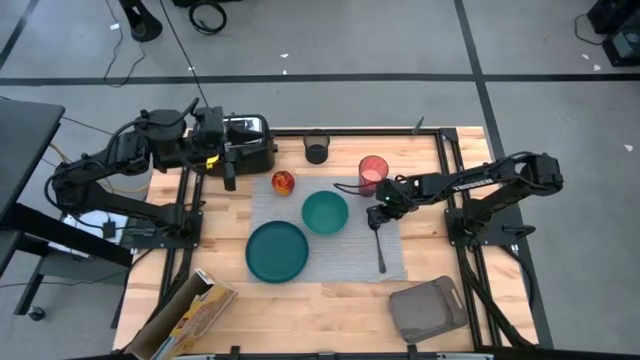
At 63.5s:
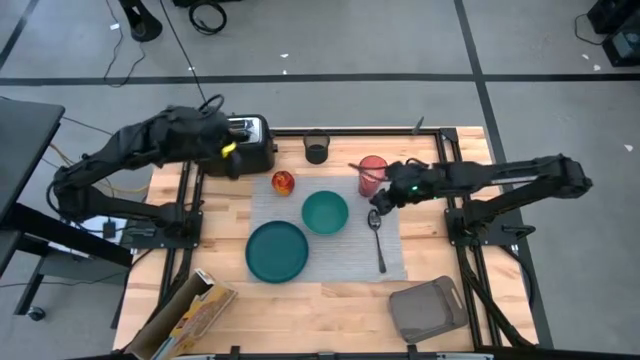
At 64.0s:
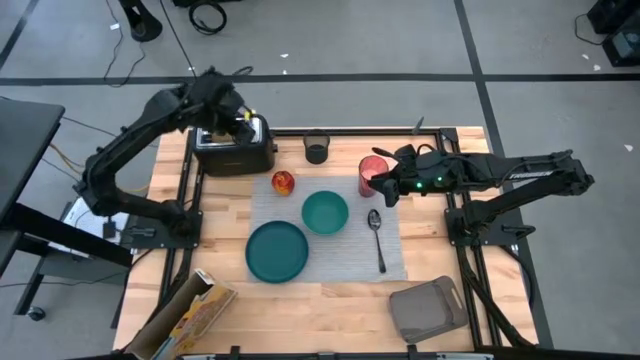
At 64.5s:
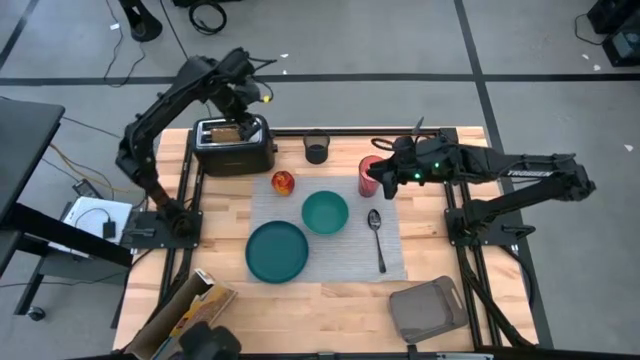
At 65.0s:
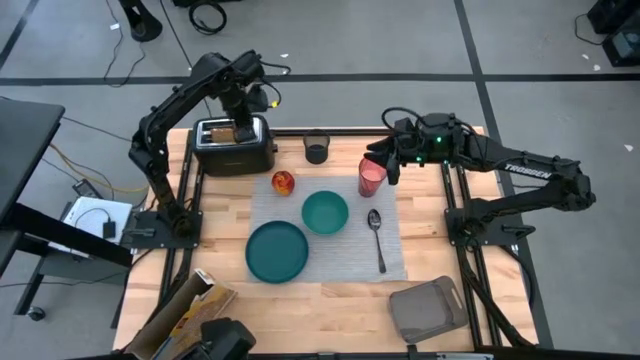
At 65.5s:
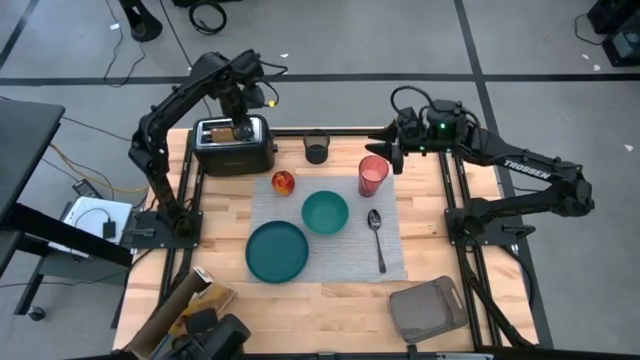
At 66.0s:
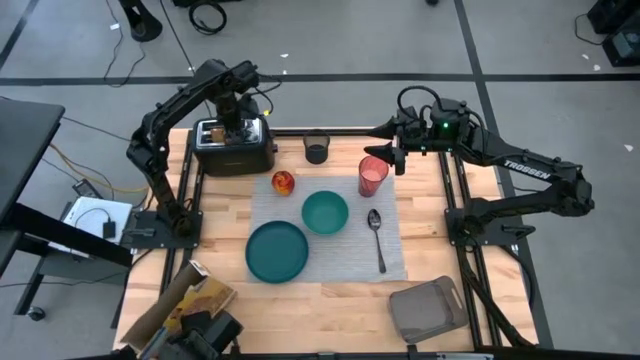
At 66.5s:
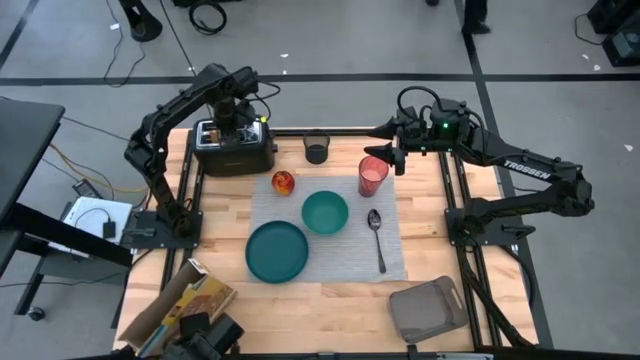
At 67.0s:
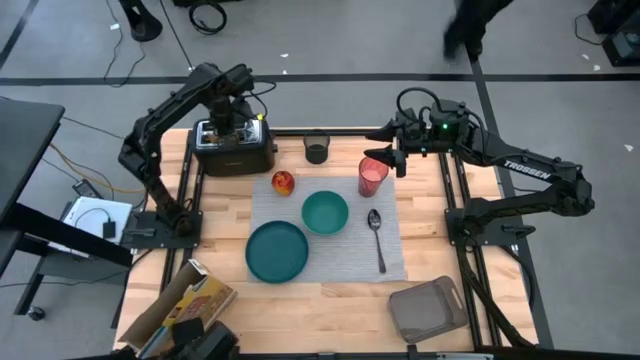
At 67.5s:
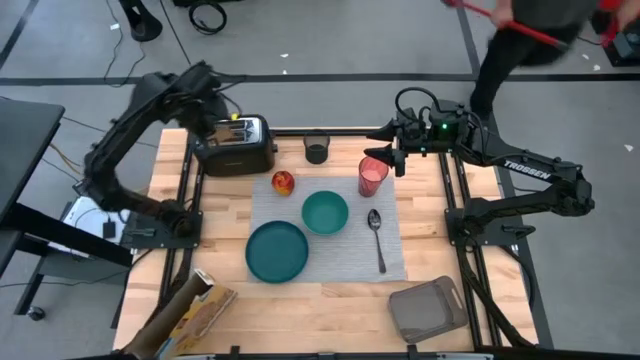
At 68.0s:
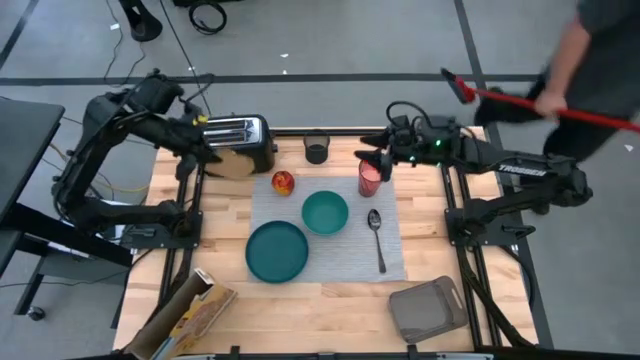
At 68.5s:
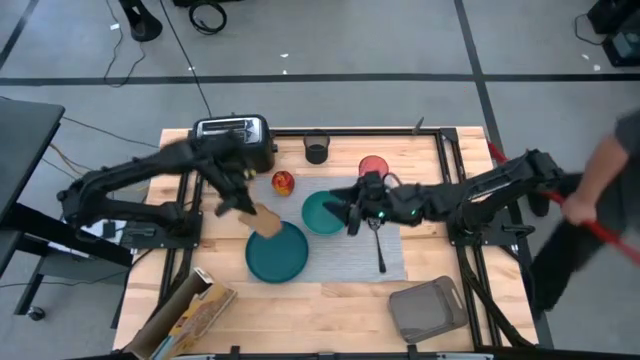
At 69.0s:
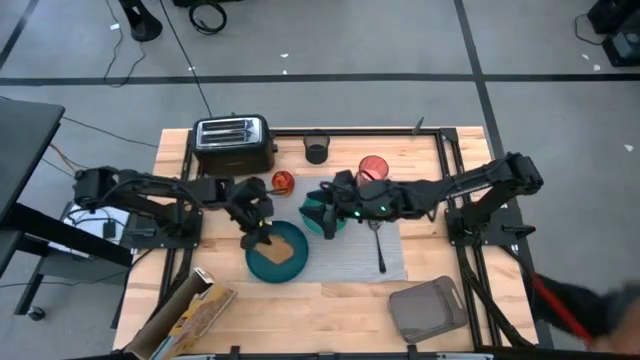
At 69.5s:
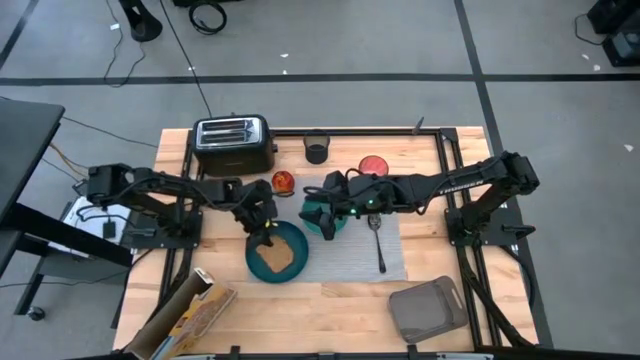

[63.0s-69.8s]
Task: Arrange a breakfast setting
Put the toasted bread from the toaster on the blue plate

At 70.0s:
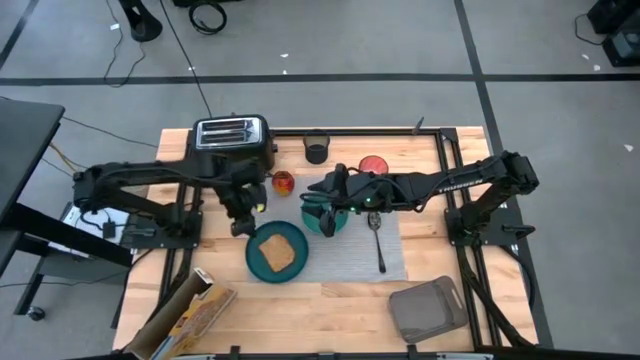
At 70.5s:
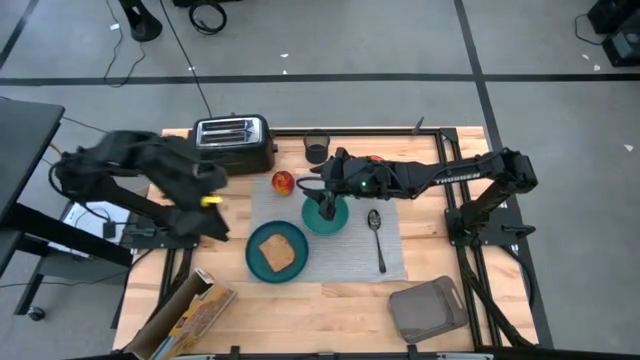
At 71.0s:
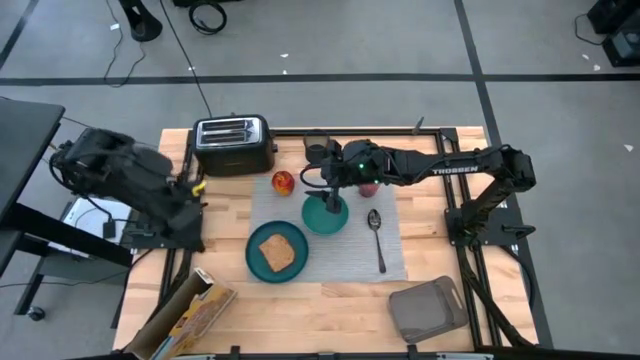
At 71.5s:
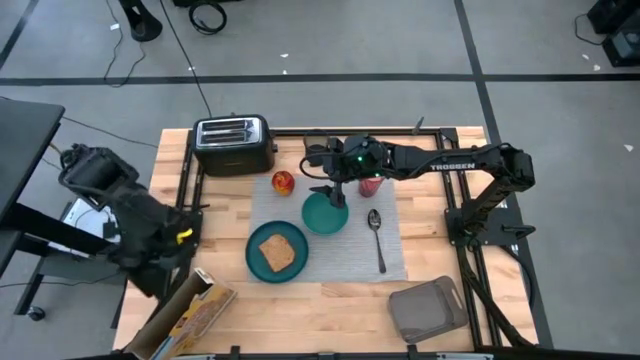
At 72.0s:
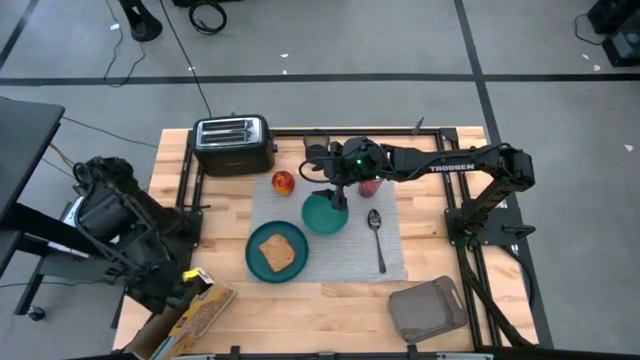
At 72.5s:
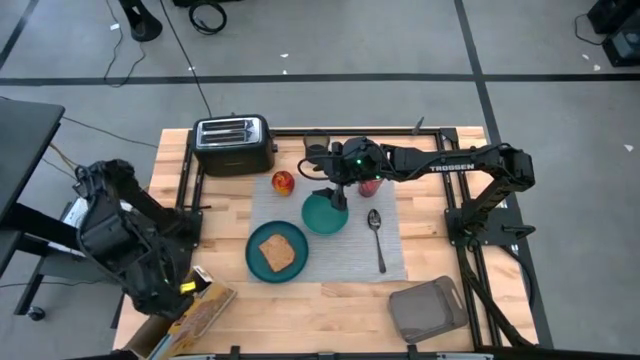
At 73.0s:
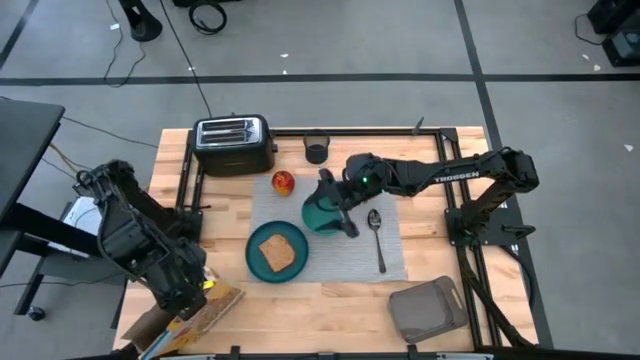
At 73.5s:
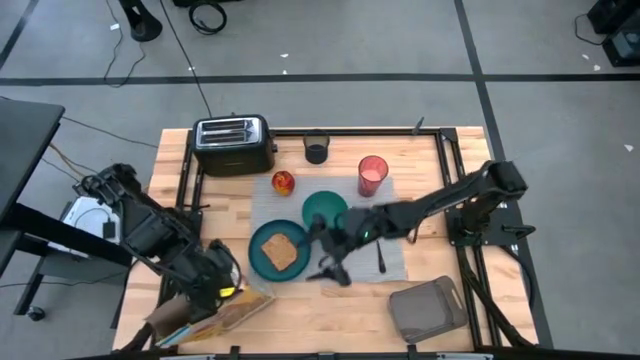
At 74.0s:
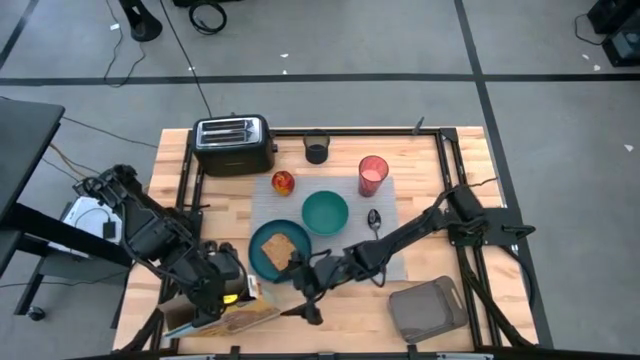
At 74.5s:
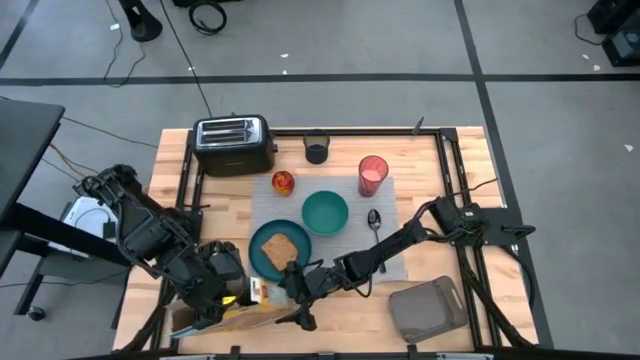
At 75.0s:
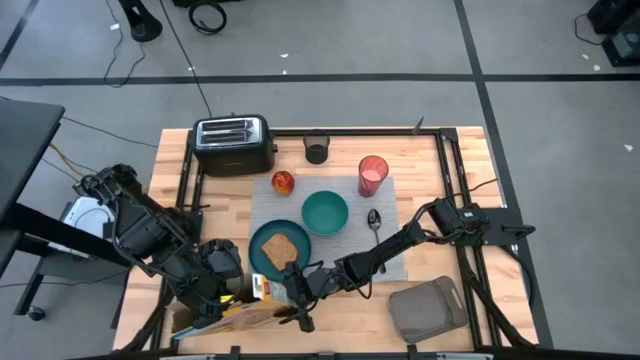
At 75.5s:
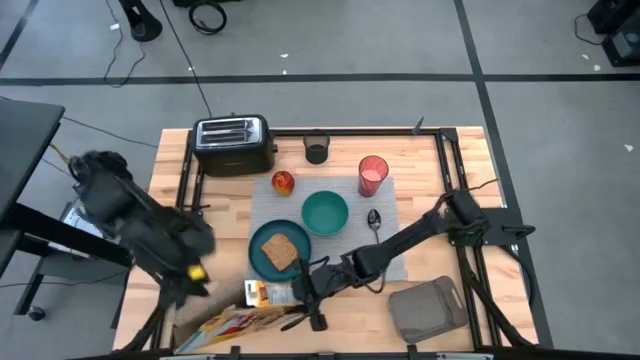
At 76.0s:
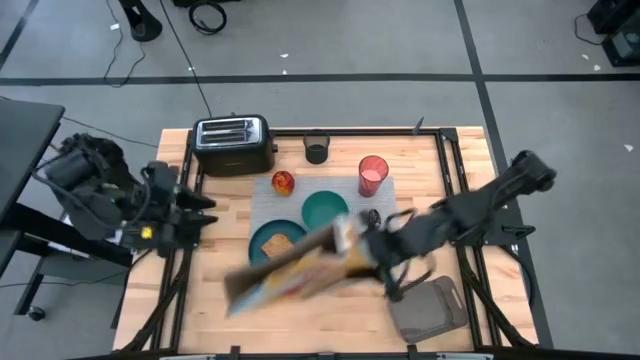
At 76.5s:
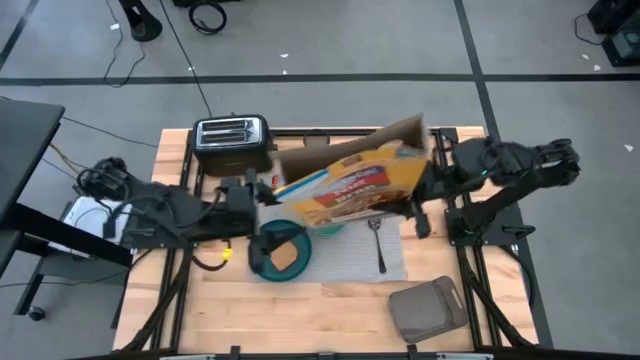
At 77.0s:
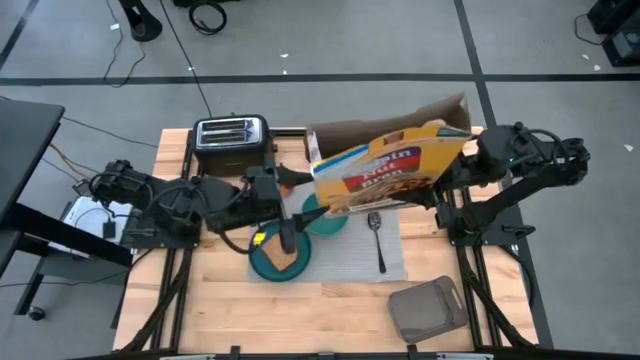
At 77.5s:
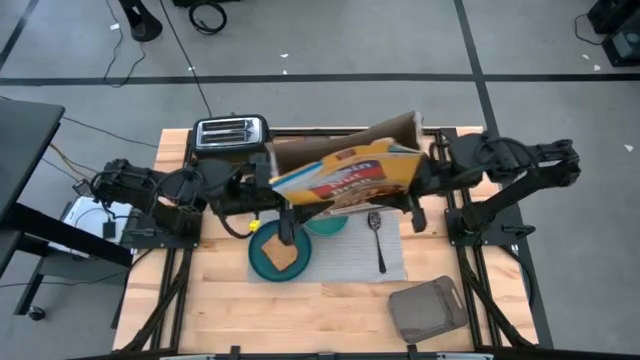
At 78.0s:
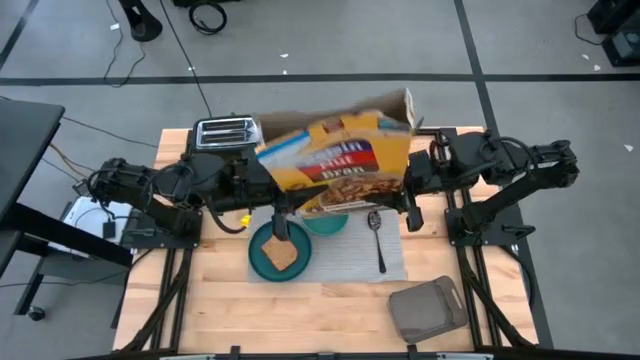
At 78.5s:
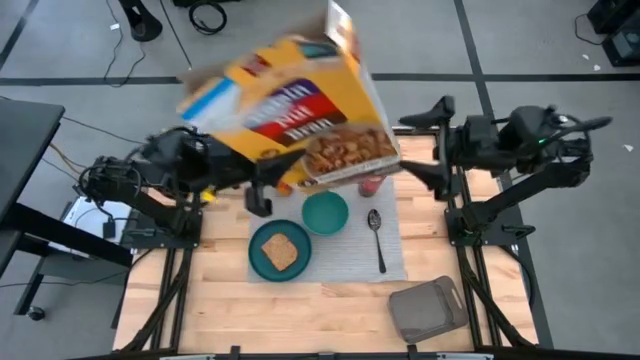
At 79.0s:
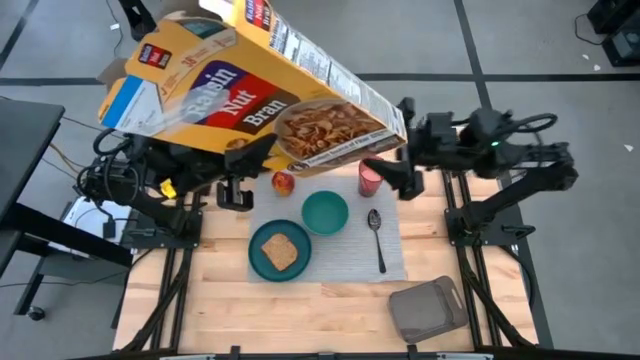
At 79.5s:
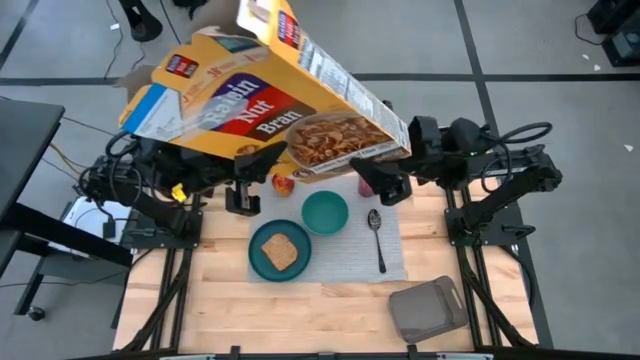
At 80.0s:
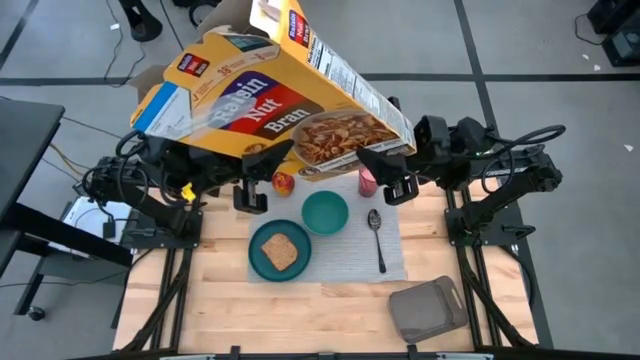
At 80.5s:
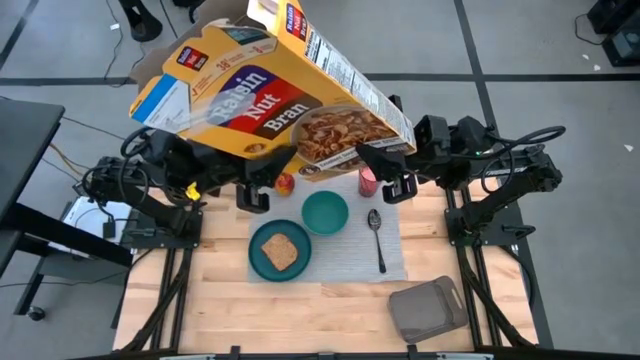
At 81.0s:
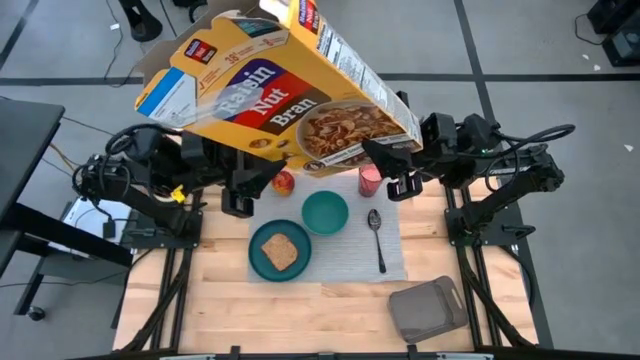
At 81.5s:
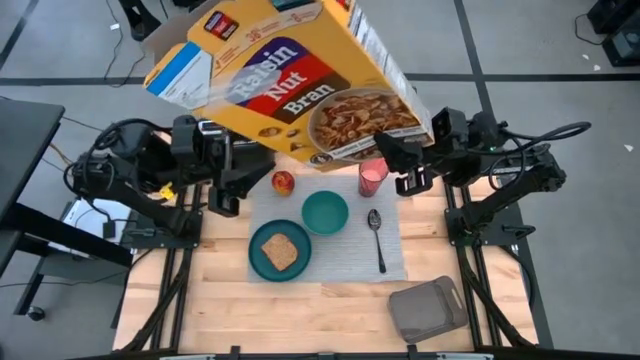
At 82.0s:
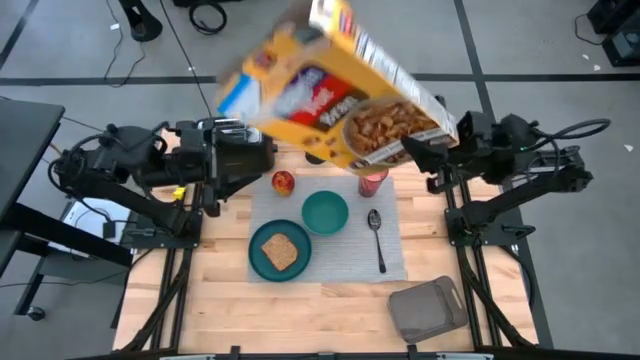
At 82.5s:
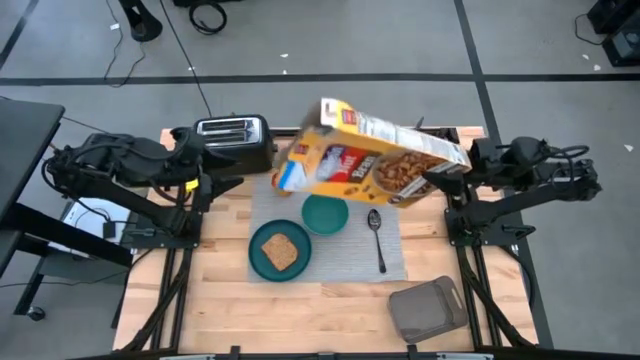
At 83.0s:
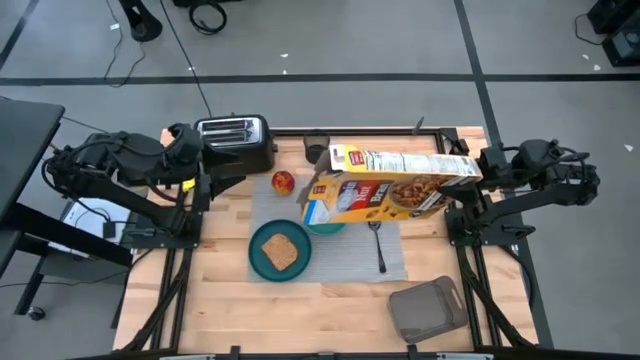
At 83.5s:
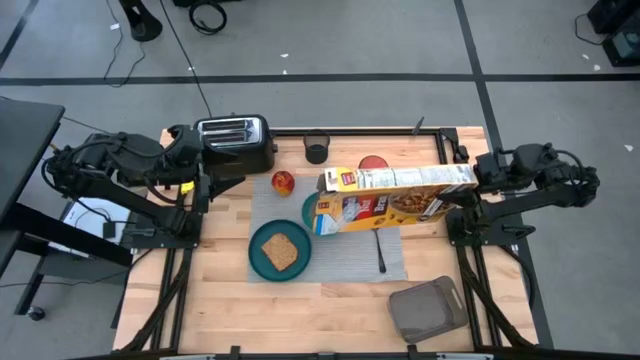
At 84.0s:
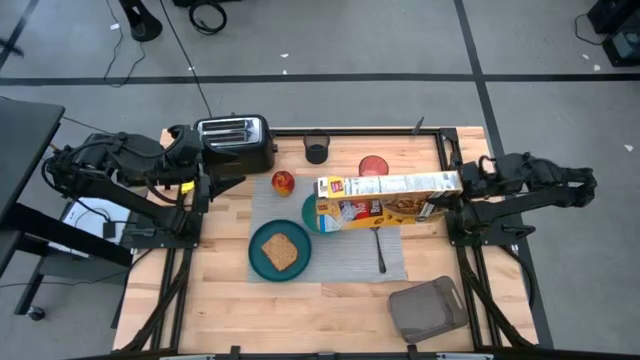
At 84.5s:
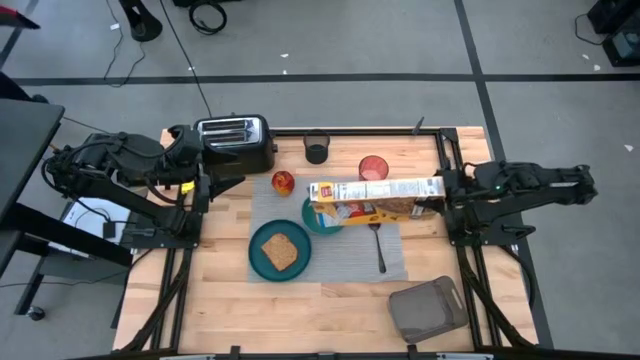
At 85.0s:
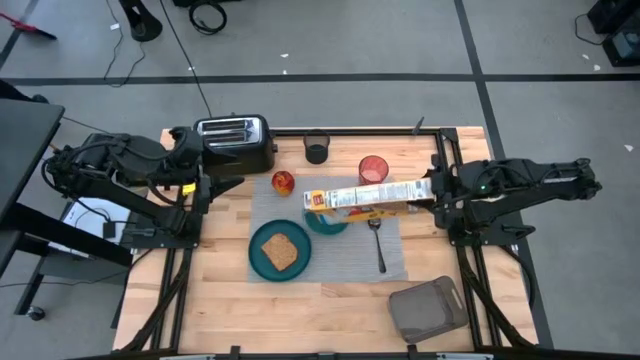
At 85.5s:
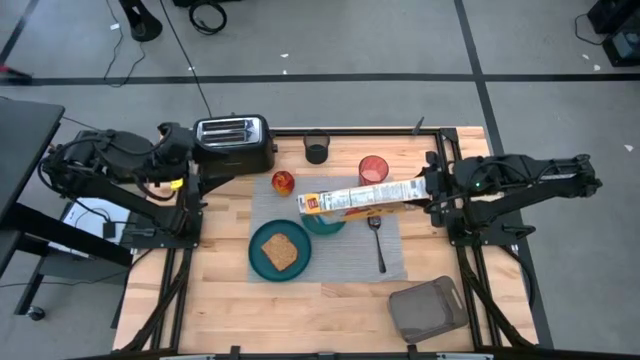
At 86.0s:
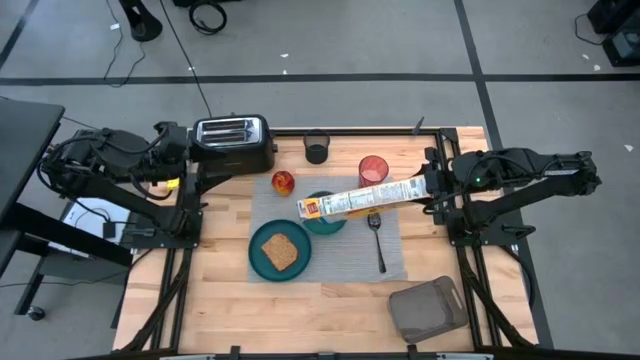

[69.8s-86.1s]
Pour the cereal from the yellow cereal box into the green bowl
